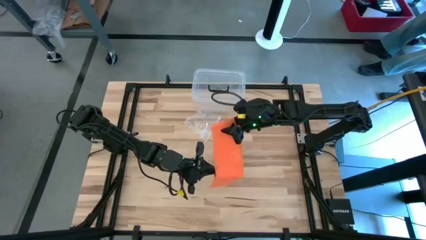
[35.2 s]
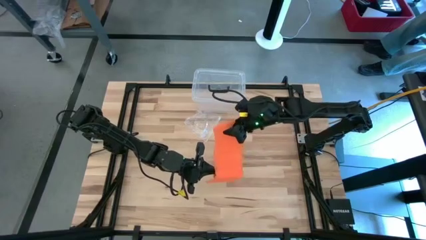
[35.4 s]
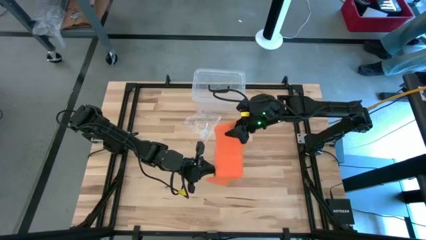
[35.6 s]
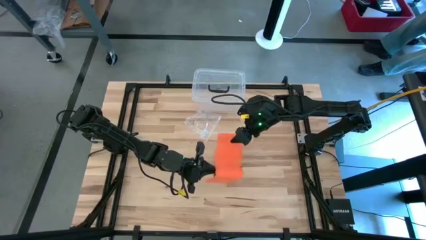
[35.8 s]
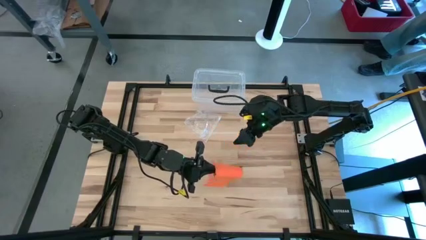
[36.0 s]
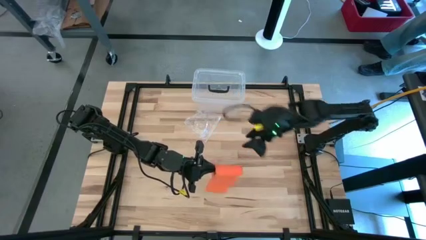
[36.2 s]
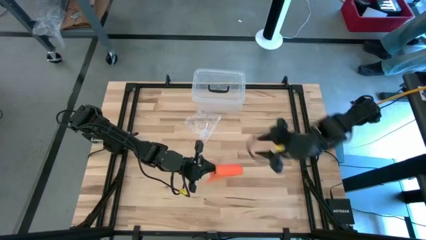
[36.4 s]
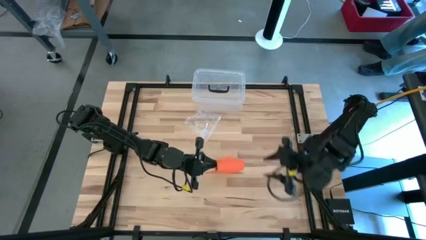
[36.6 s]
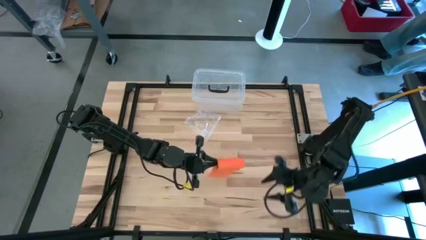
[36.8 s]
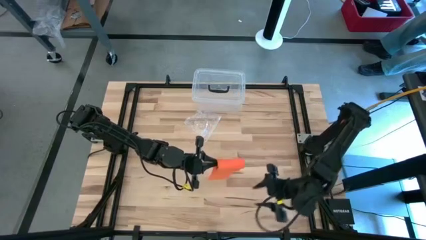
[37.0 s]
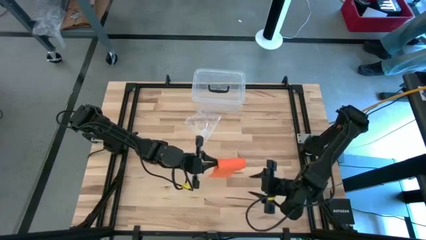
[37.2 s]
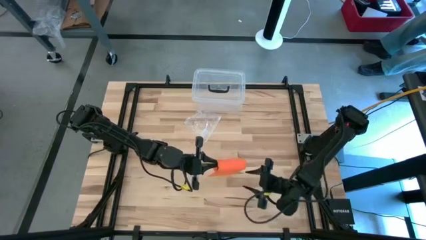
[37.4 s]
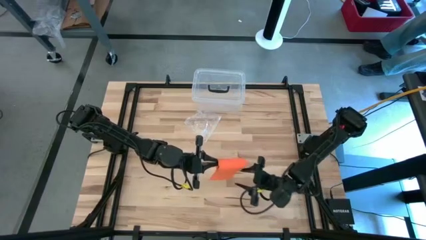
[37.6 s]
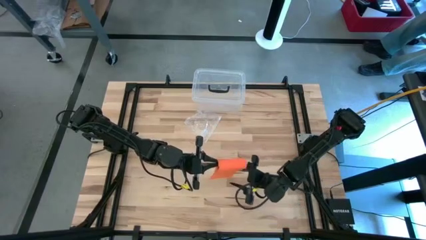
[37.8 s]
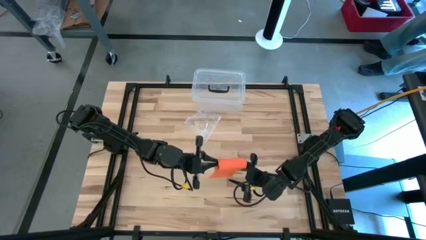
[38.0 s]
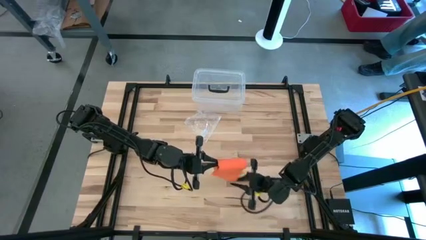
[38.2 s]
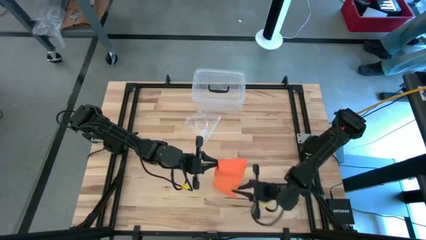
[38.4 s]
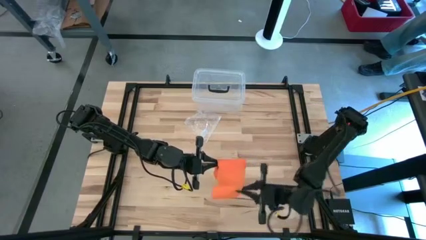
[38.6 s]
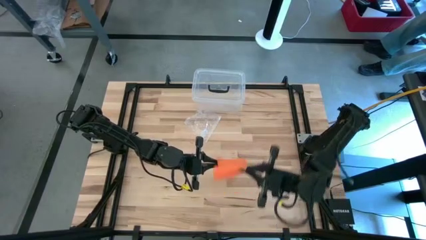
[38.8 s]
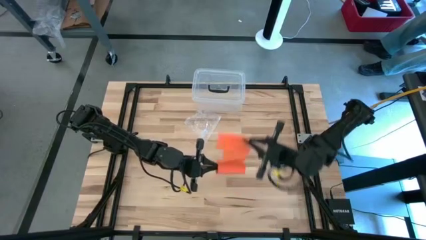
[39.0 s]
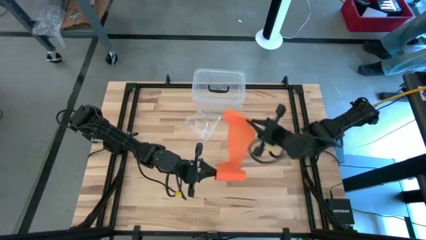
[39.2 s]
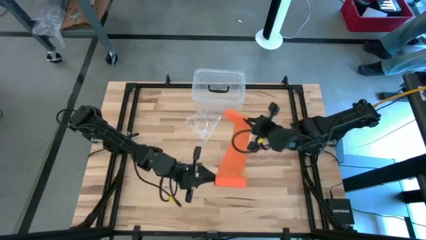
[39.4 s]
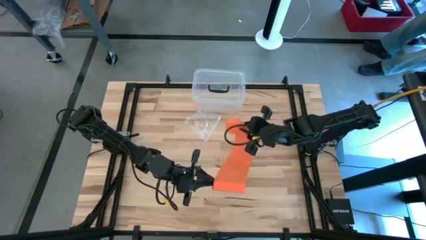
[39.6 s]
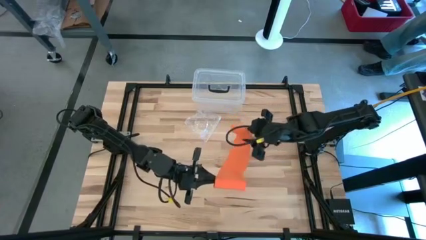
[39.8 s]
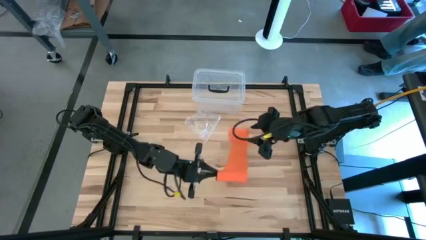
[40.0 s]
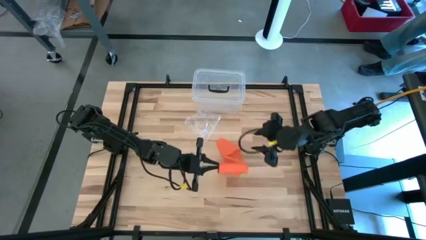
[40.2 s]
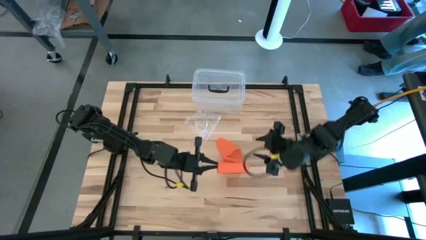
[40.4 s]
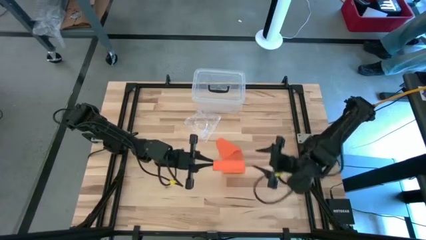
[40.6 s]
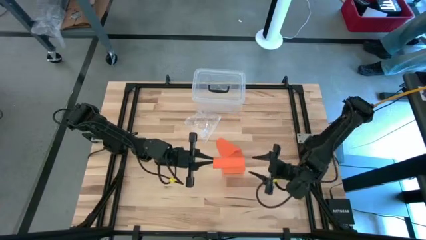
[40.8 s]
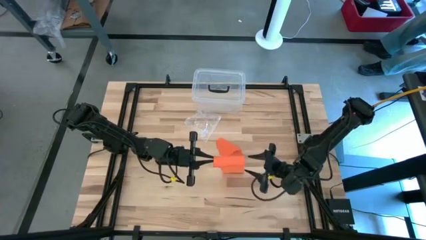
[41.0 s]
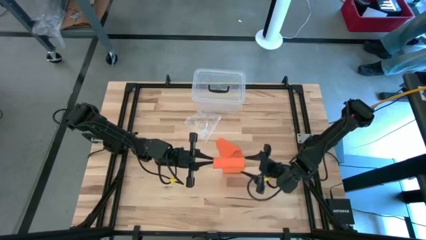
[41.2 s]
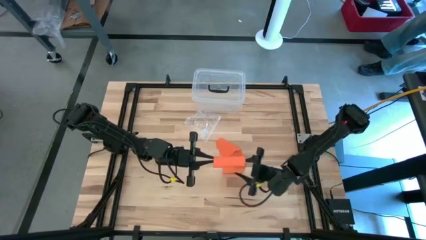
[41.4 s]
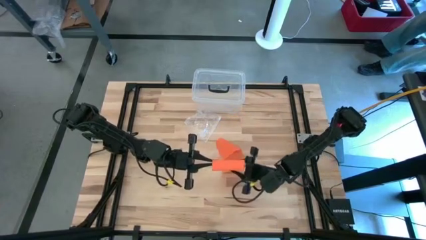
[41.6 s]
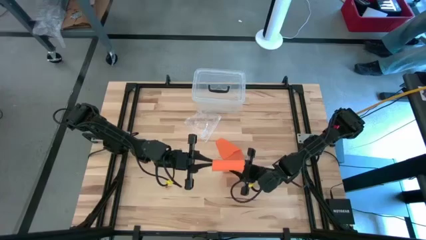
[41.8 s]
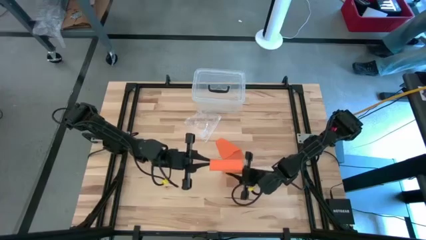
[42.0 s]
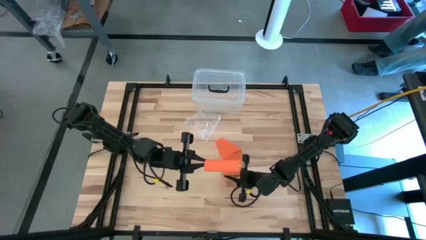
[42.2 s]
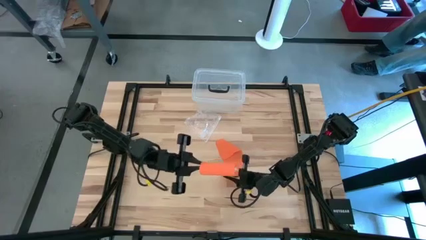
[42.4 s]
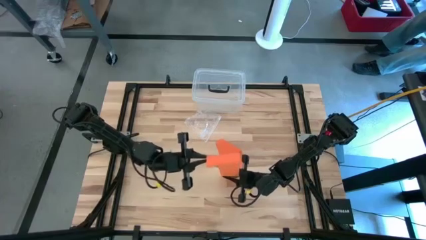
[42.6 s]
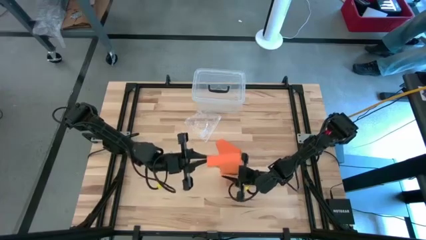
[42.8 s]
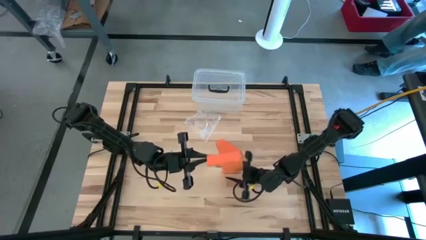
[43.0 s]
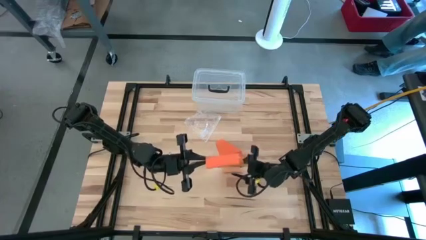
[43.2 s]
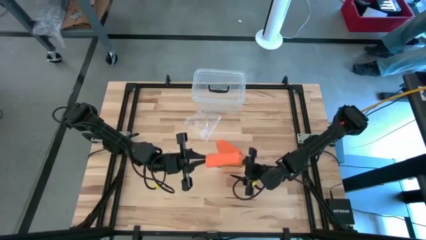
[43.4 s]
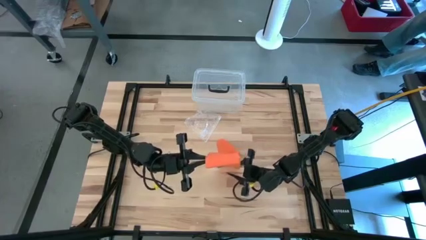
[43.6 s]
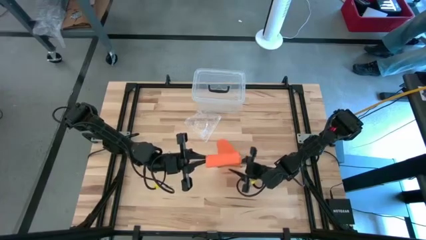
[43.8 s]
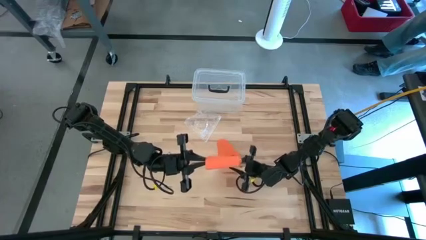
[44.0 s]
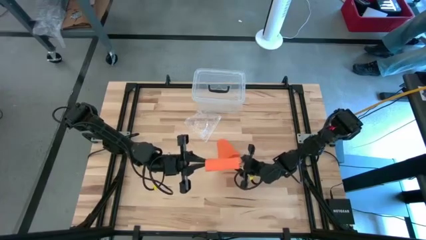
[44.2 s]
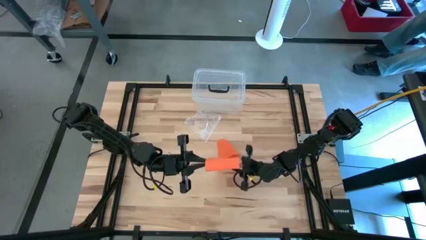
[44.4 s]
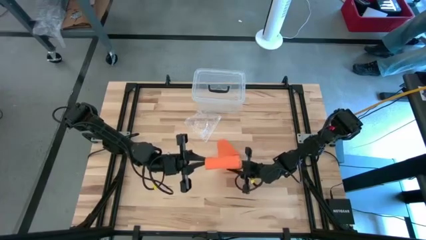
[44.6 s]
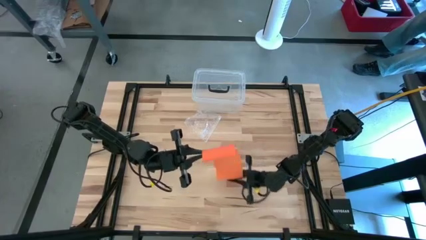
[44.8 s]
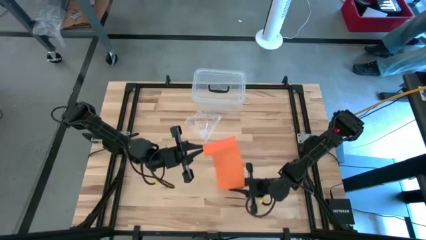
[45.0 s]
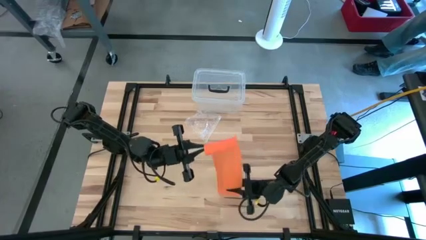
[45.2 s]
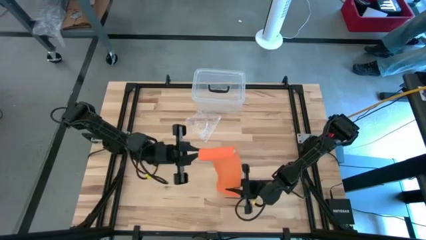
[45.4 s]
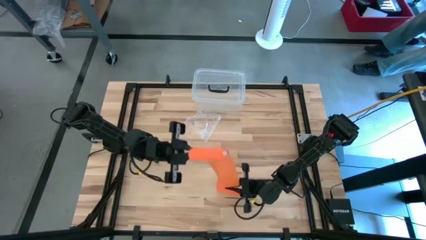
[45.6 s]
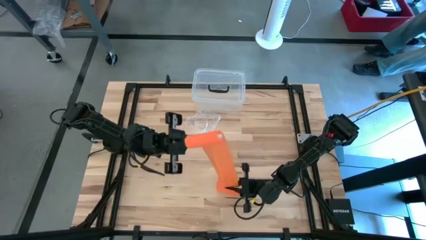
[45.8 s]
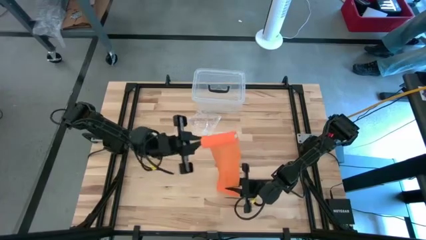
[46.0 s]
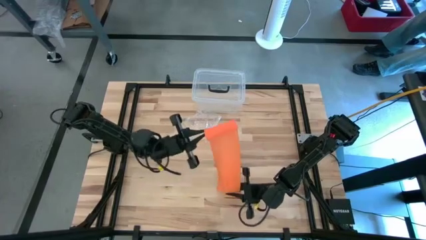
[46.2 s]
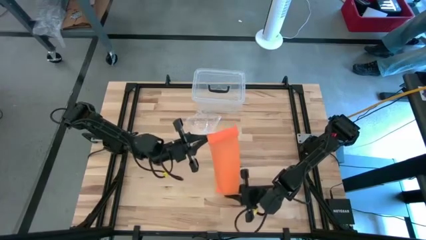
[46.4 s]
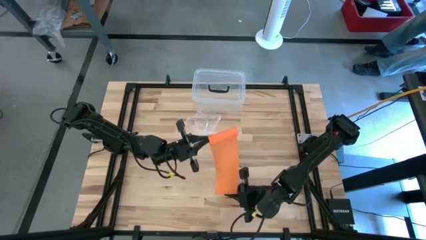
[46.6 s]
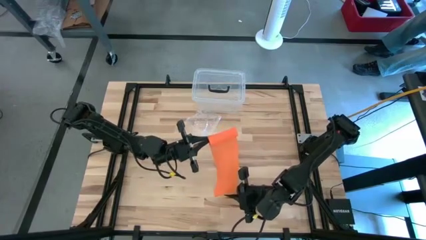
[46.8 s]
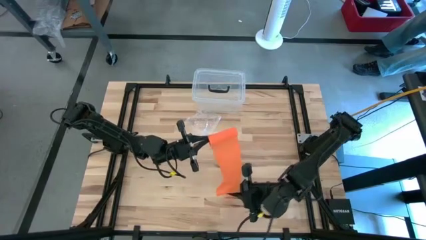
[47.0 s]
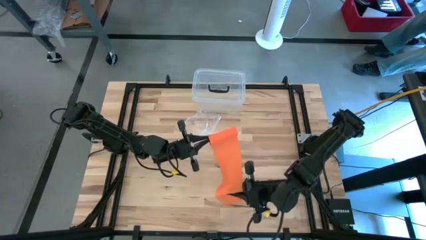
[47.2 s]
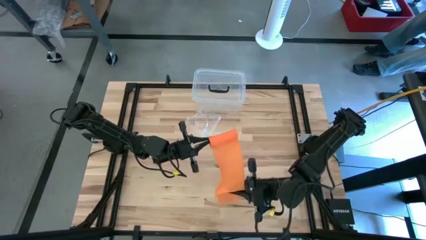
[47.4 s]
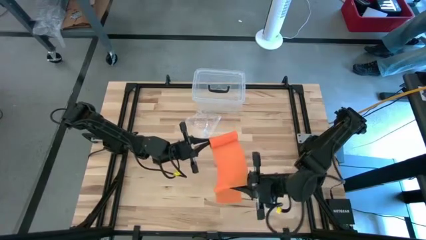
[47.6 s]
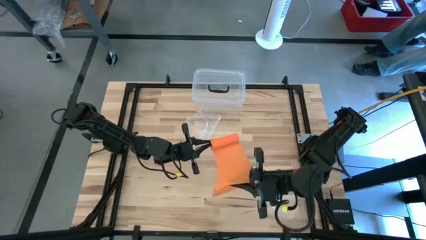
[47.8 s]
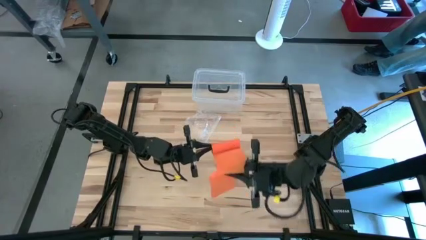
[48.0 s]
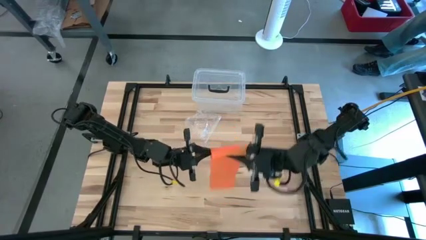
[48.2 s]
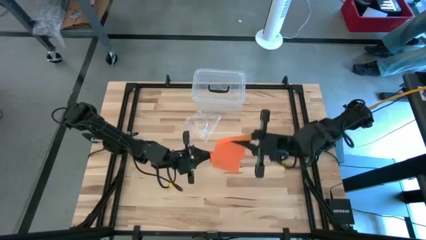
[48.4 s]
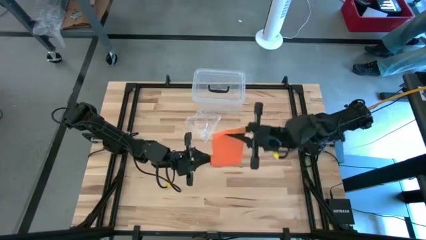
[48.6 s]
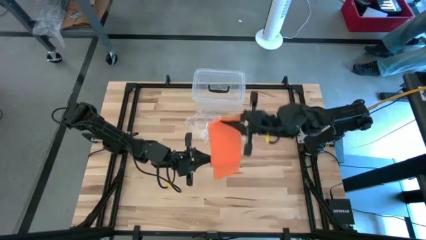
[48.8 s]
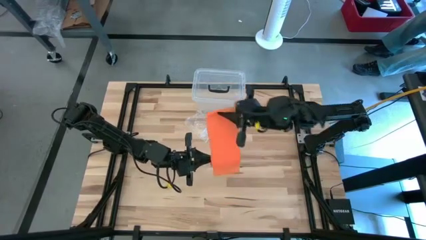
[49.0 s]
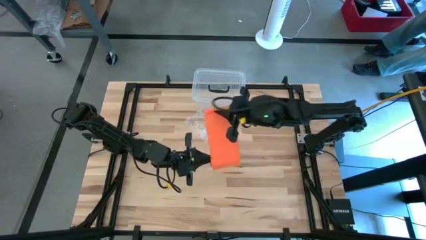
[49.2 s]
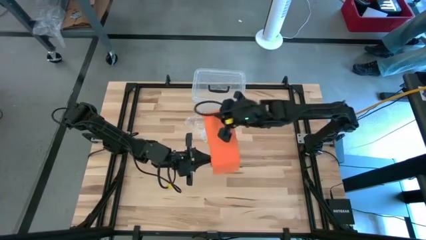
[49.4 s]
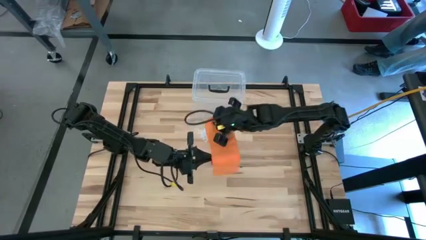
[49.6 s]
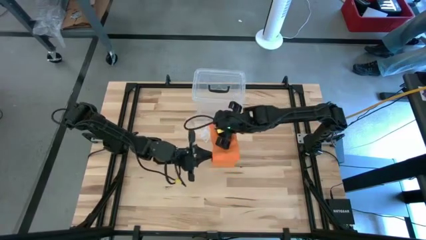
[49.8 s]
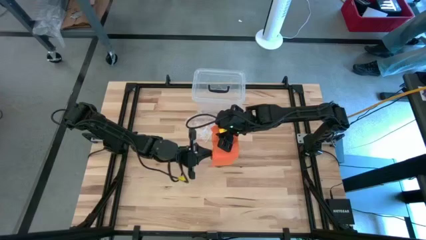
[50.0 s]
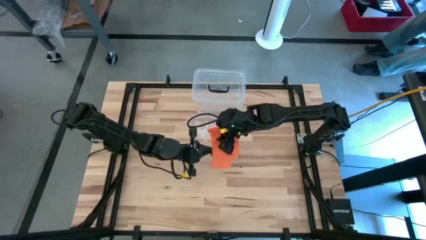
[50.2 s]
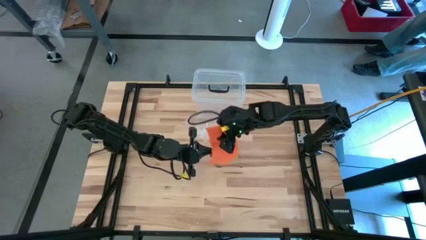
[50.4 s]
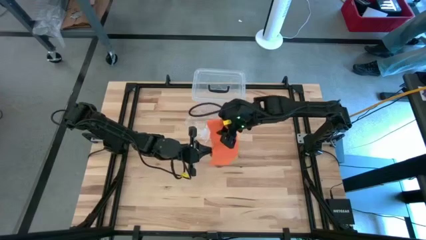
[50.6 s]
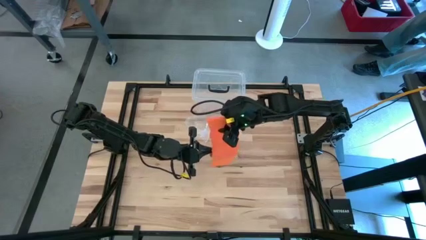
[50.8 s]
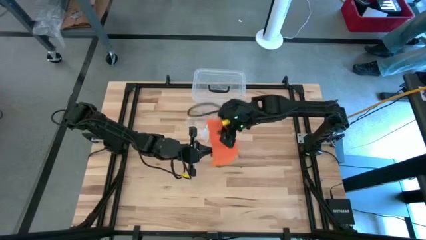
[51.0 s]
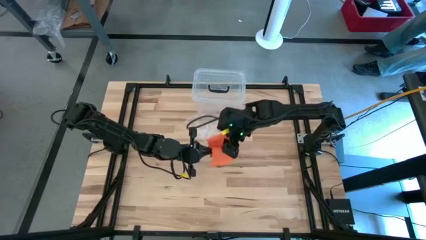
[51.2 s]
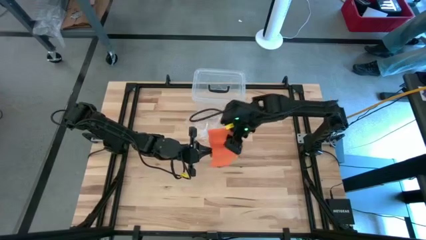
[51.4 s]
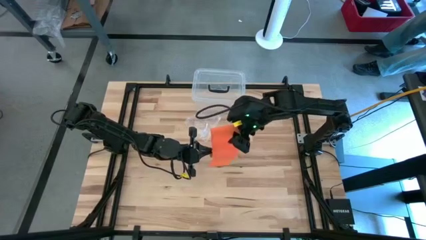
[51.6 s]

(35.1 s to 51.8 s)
Task: Roll bandage
Roll the orange bandage
